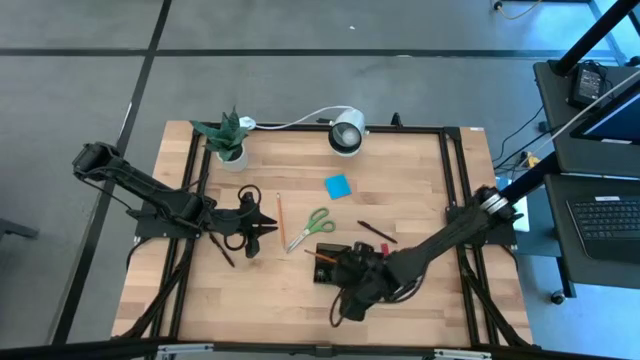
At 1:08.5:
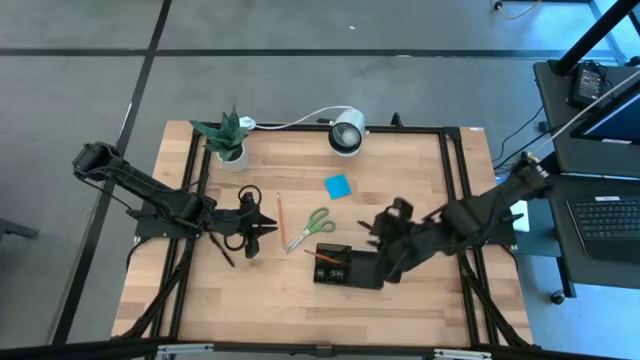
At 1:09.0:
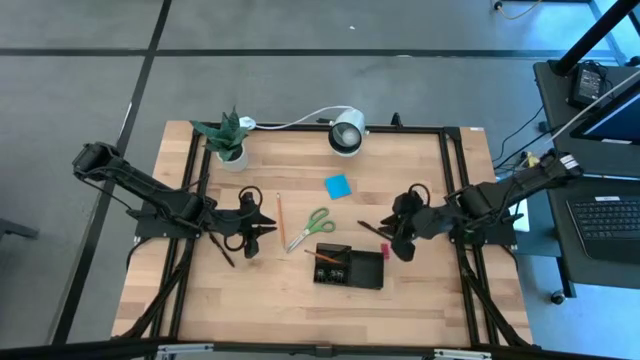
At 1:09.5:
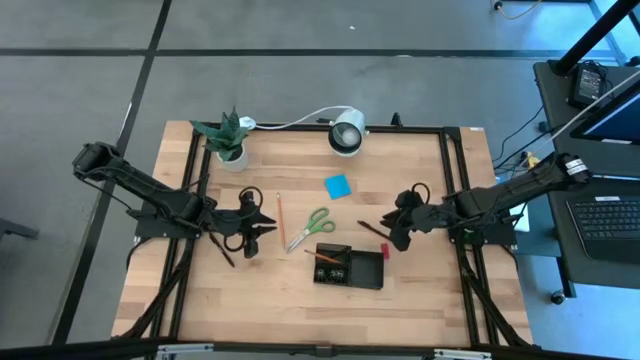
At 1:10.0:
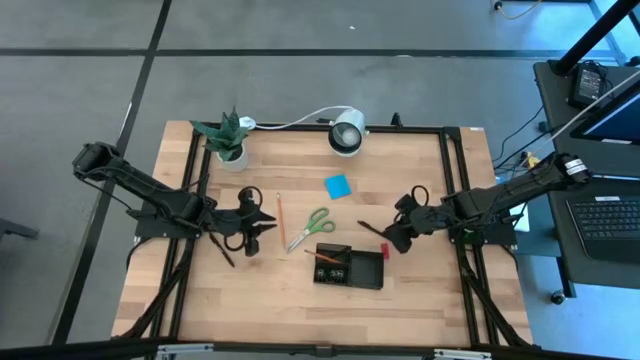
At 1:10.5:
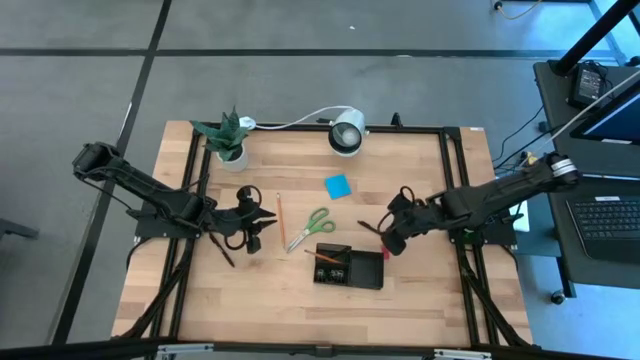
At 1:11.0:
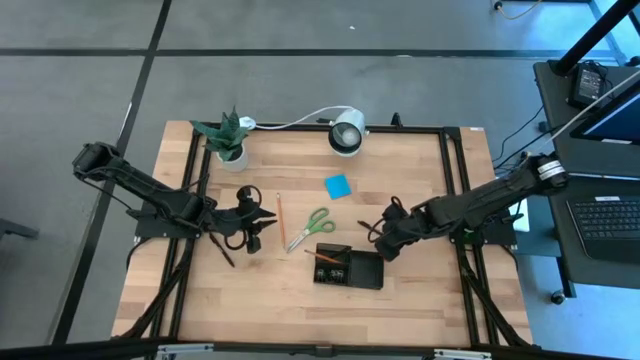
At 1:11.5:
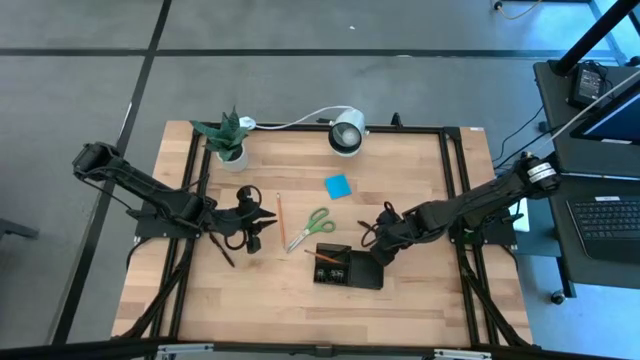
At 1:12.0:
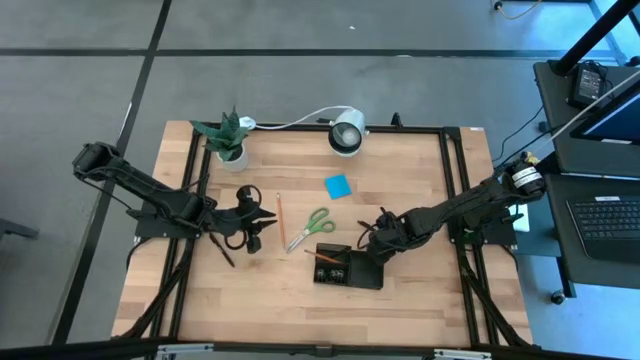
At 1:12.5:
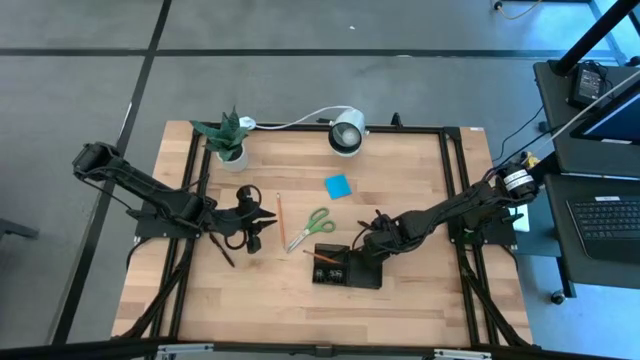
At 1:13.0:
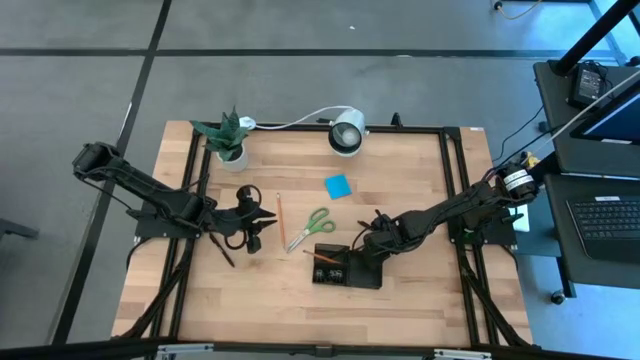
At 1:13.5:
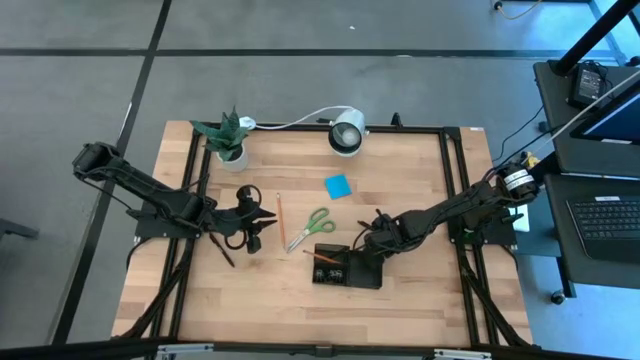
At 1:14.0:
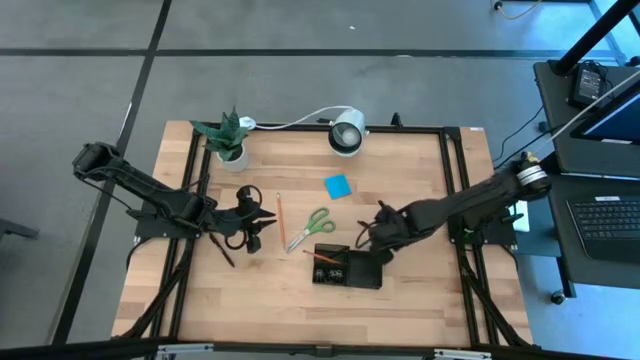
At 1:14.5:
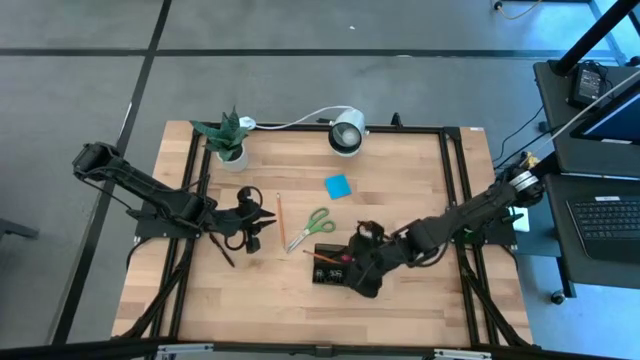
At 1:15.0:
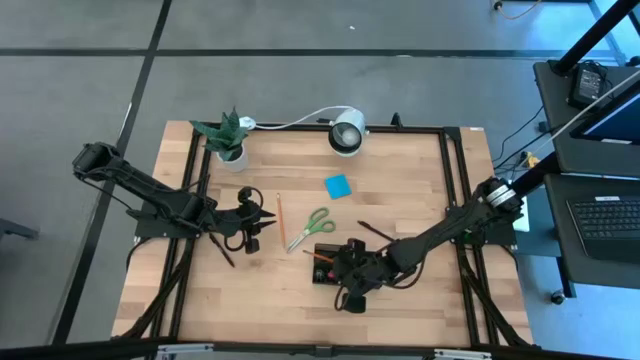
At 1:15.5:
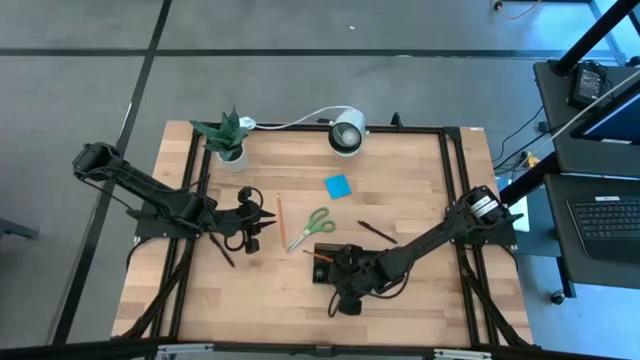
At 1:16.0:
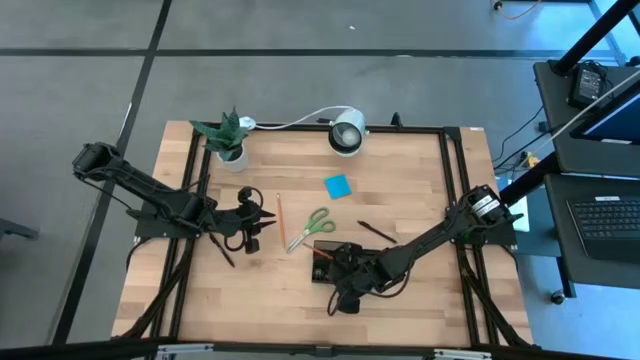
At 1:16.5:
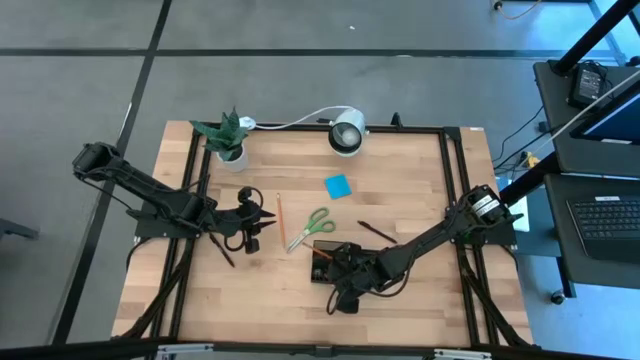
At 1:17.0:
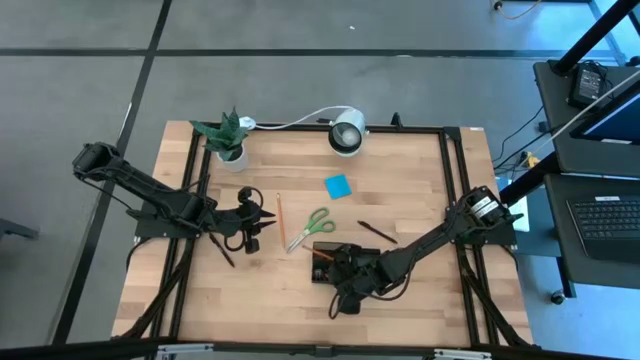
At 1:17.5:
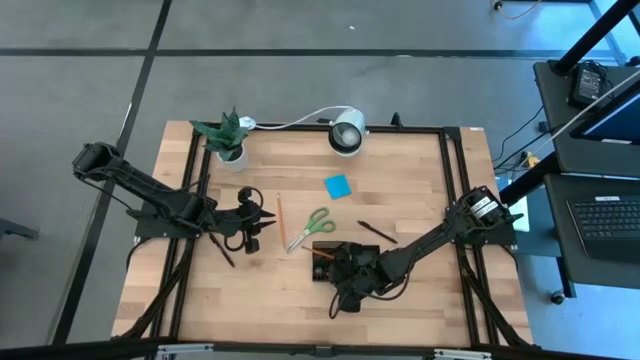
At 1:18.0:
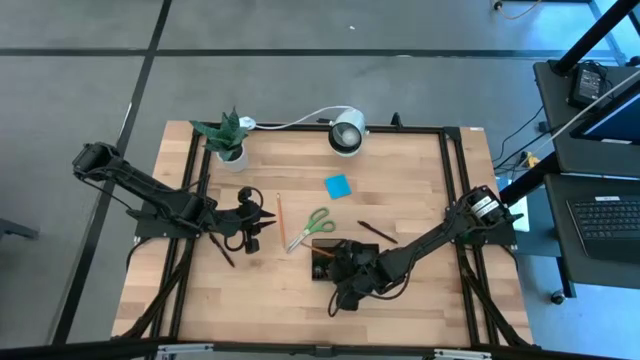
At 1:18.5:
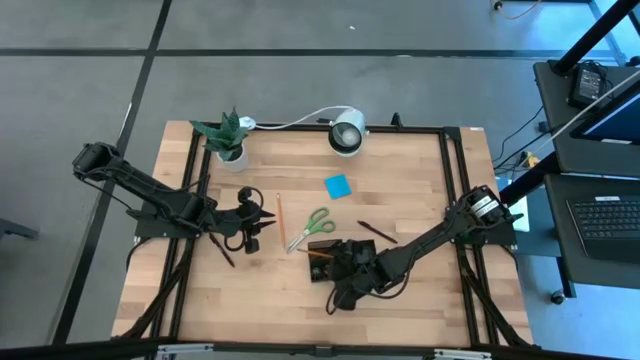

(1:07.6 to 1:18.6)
Task: Pick and place office supplies into organizer
Put the eraser into the desk organizer

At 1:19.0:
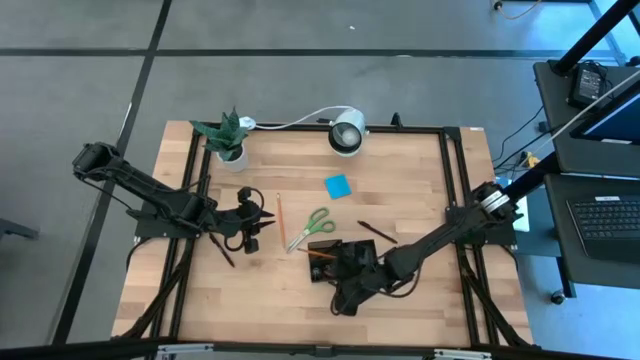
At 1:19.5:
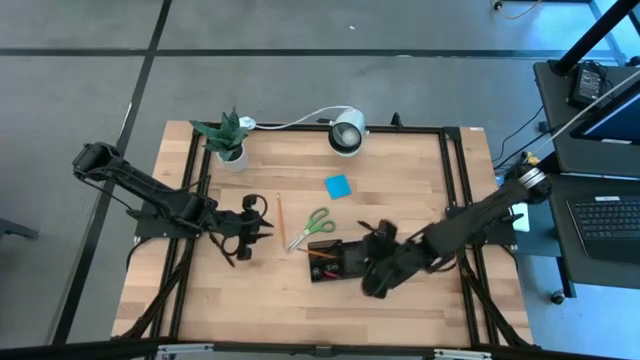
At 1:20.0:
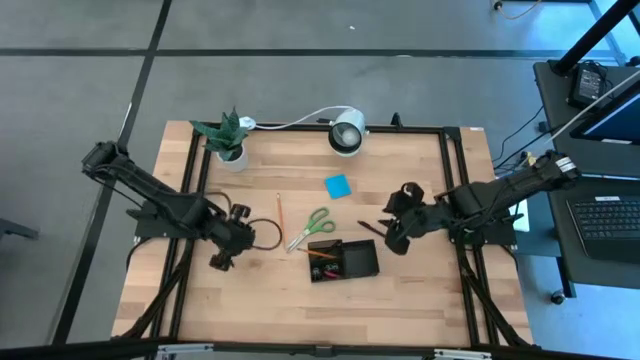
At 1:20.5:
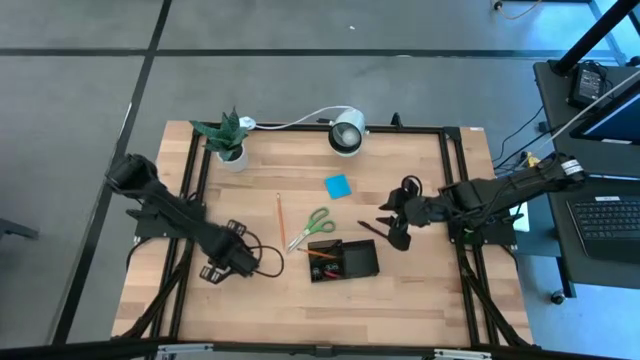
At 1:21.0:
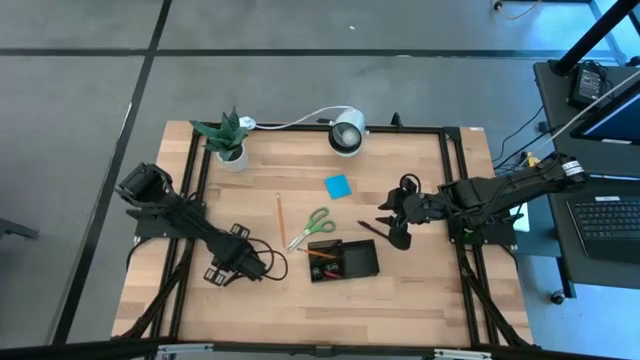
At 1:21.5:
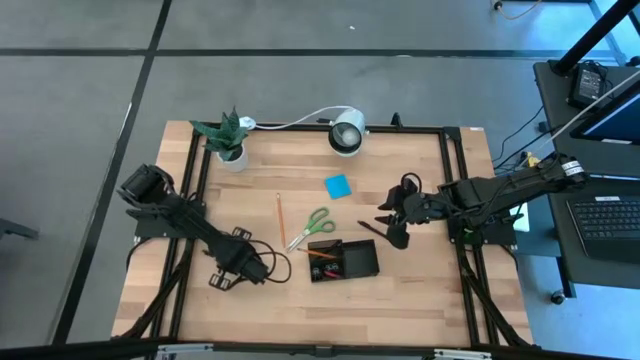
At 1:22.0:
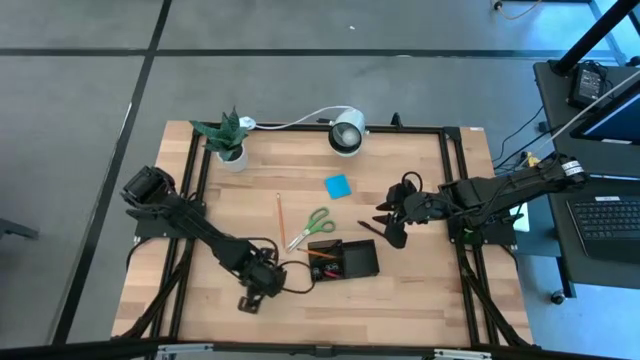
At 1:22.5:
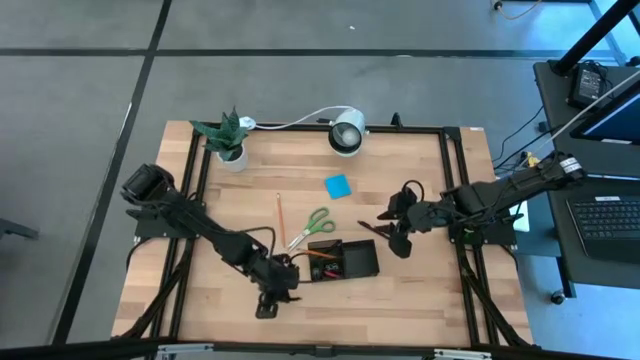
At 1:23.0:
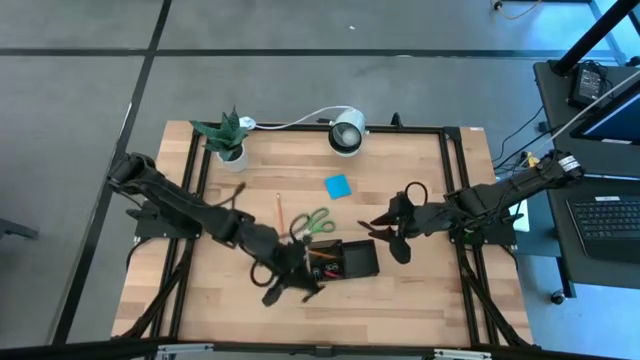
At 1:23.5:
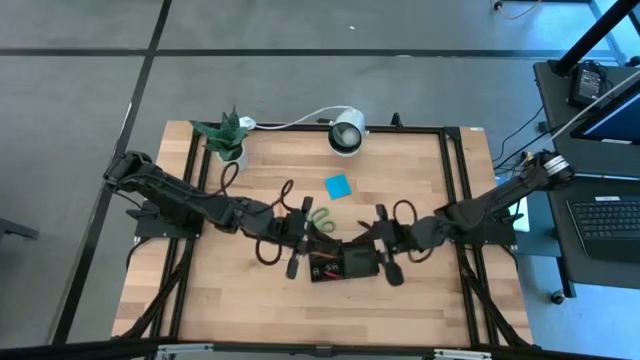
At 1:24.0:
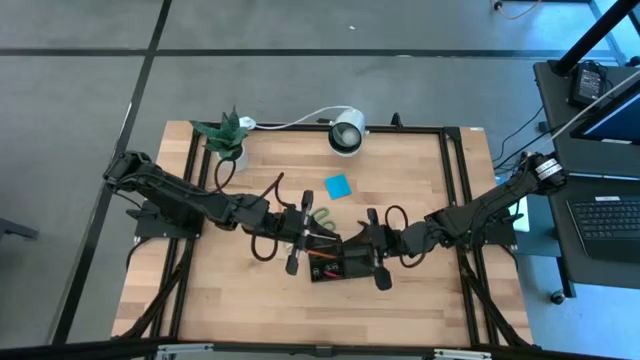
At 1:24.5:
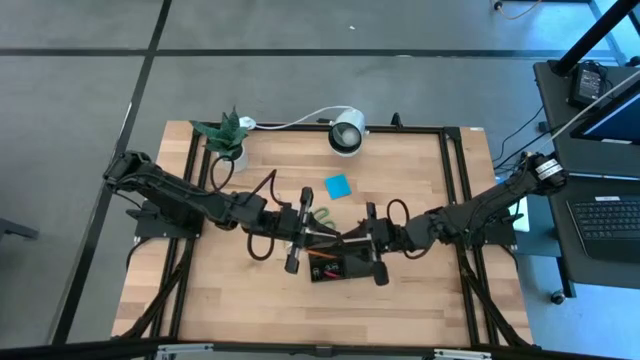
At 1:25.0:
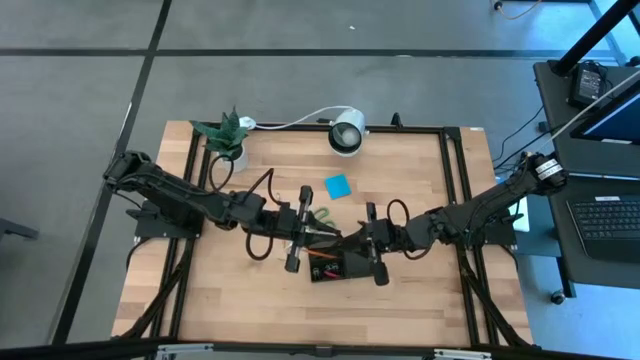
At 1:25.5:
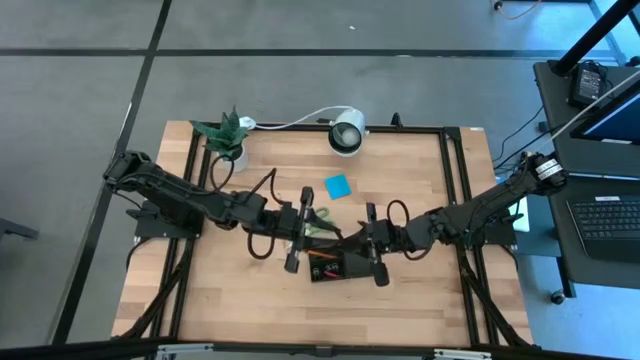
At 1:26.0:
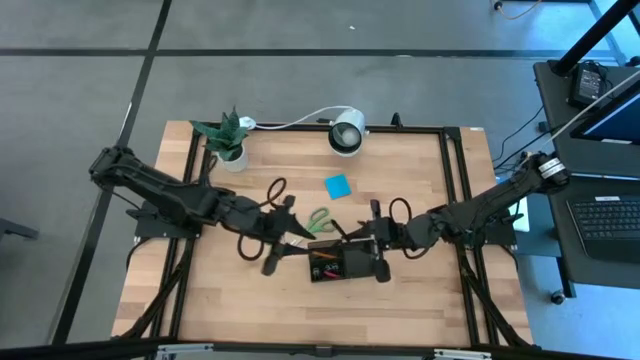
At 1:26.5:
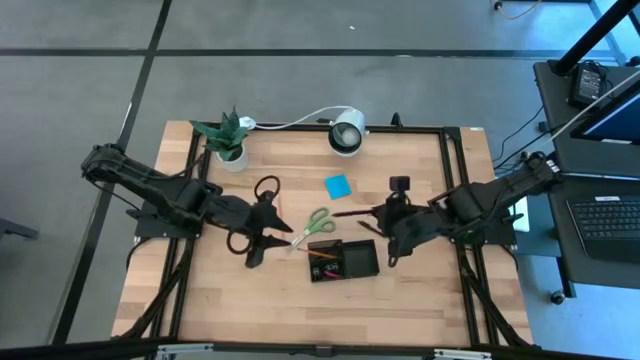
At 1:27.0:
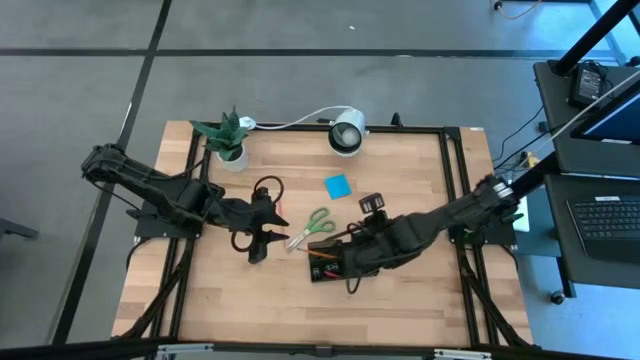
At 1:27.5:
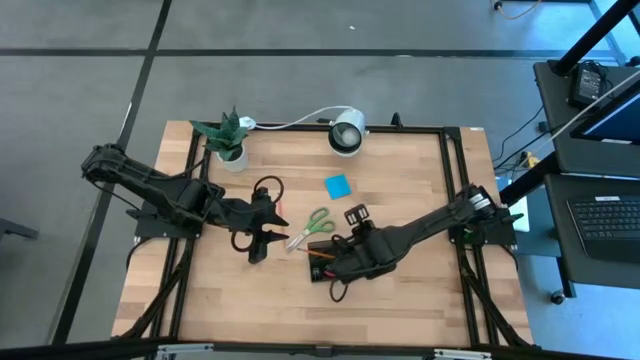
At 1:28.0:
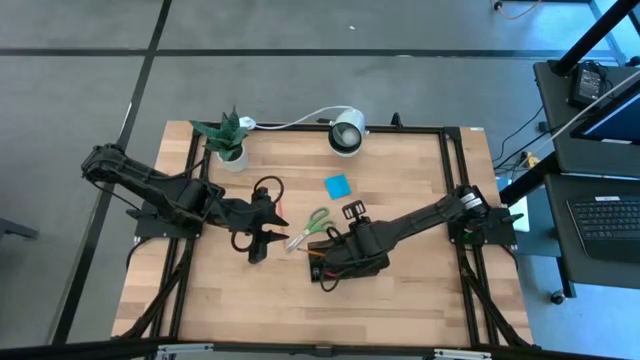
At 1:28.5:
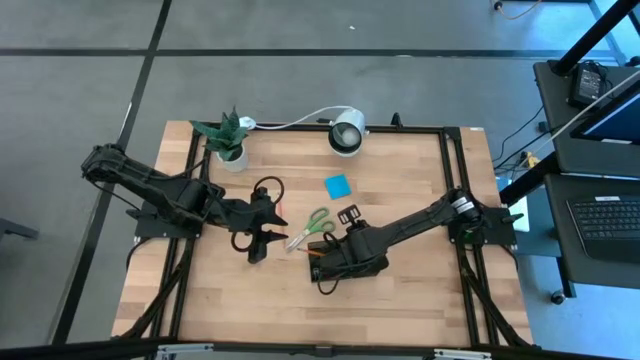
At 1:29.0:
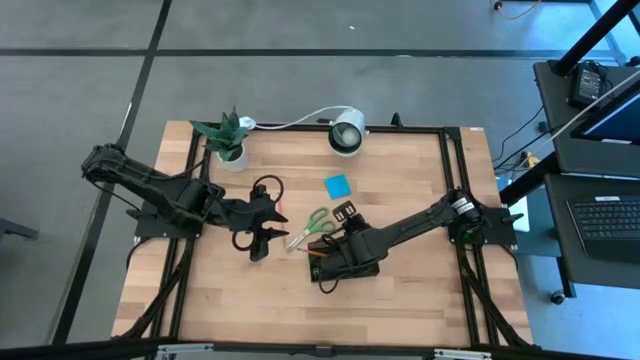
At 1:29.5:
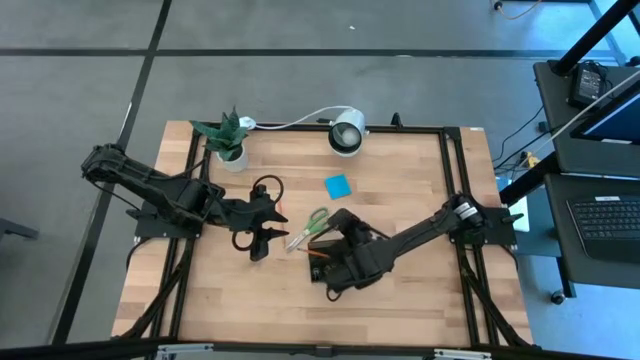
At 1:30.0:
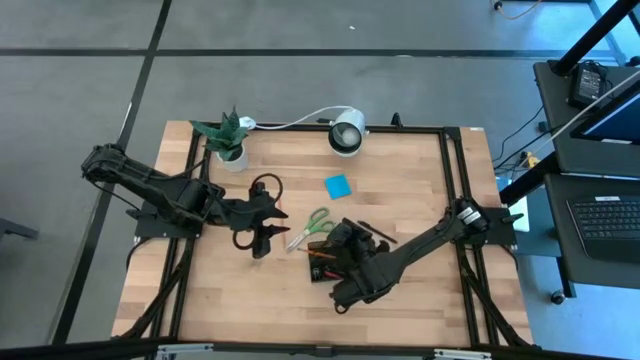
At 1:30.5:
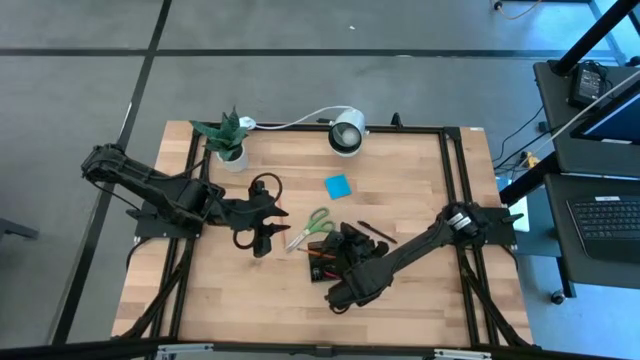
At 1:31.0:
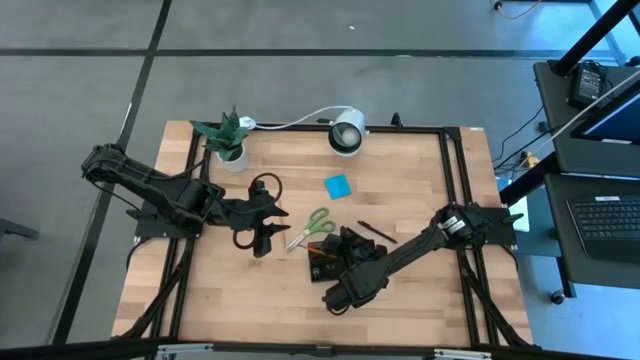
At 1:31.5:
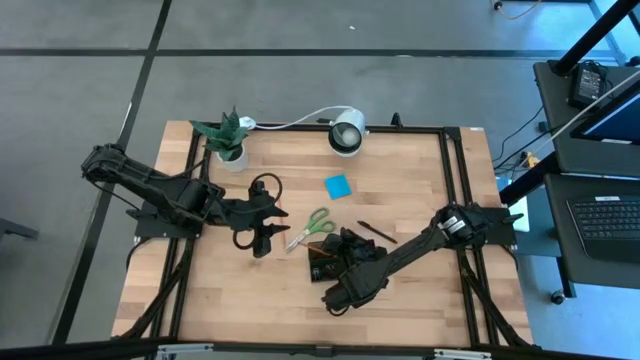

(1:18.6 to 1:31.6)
Put the left black pen into the desk organizer
